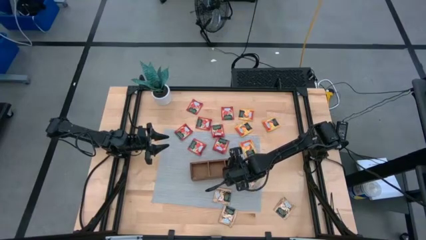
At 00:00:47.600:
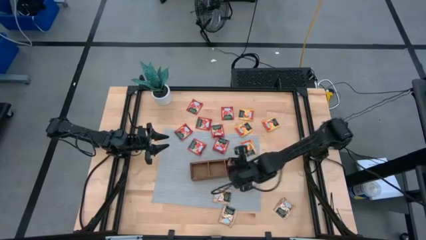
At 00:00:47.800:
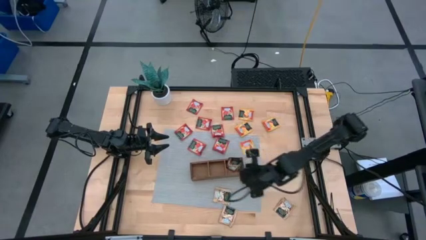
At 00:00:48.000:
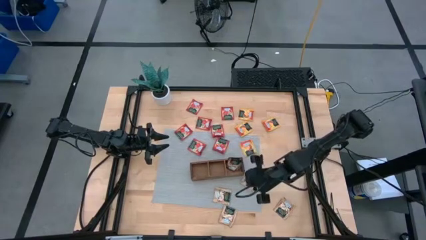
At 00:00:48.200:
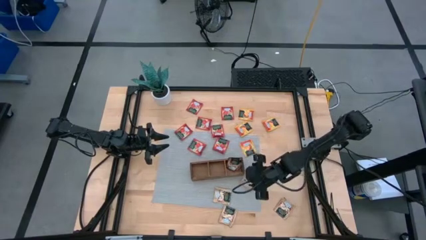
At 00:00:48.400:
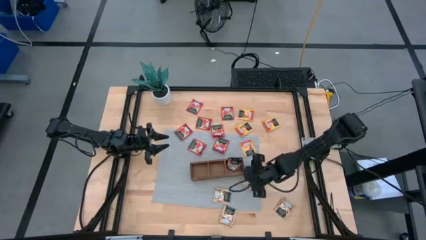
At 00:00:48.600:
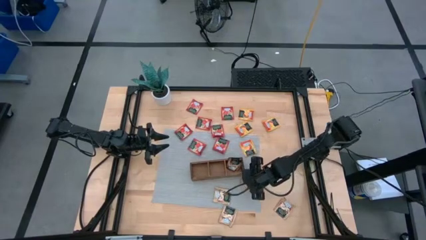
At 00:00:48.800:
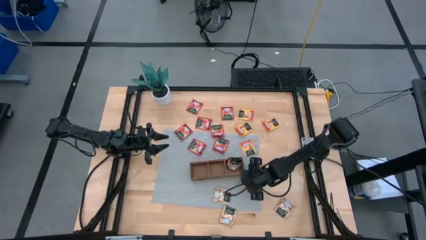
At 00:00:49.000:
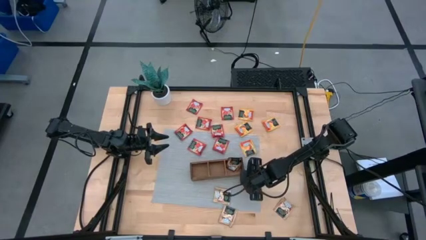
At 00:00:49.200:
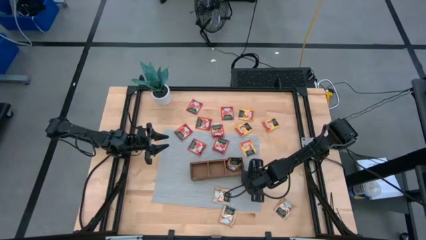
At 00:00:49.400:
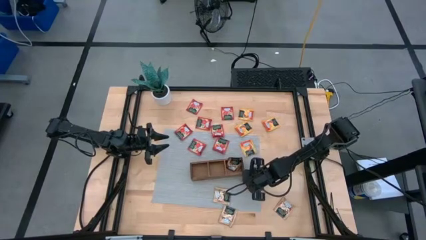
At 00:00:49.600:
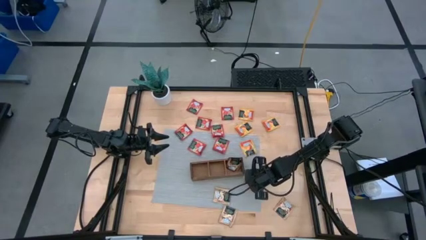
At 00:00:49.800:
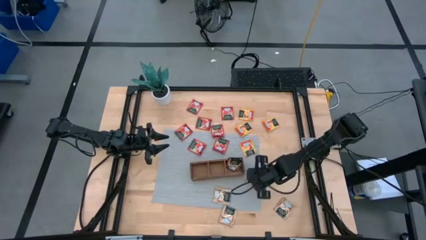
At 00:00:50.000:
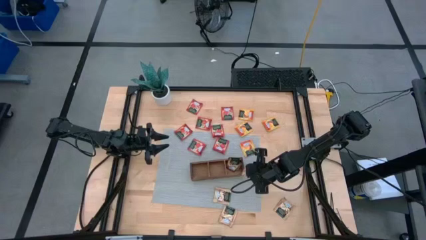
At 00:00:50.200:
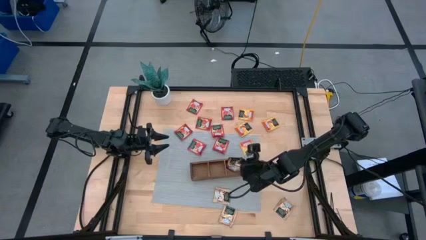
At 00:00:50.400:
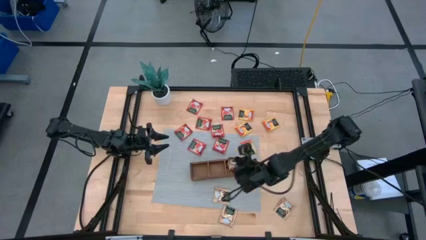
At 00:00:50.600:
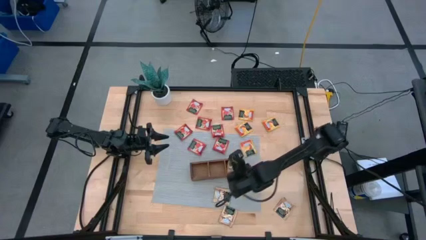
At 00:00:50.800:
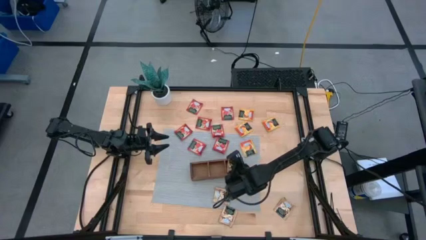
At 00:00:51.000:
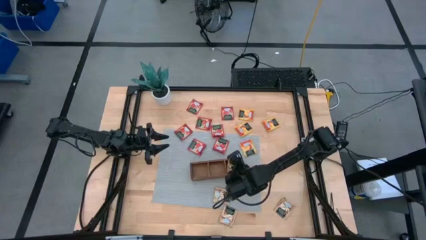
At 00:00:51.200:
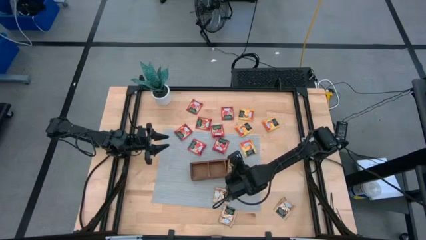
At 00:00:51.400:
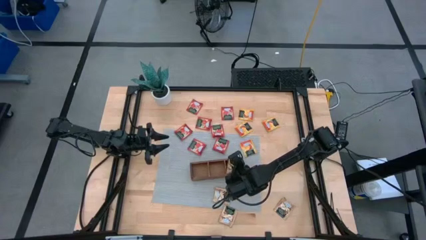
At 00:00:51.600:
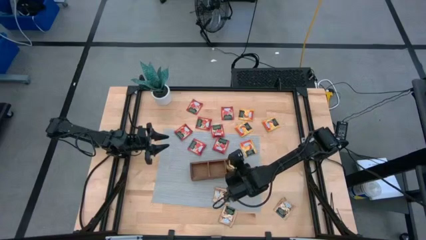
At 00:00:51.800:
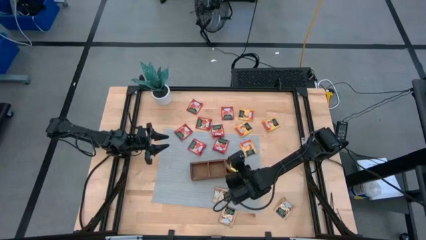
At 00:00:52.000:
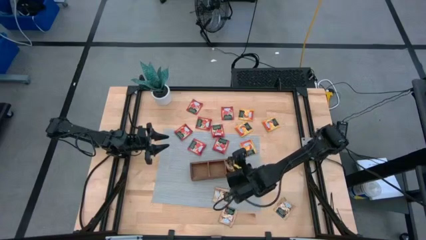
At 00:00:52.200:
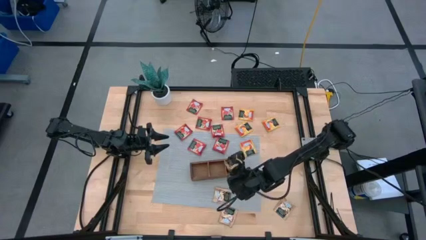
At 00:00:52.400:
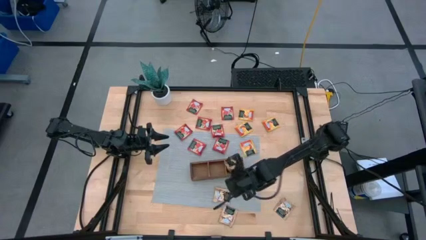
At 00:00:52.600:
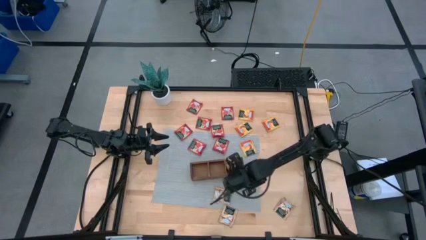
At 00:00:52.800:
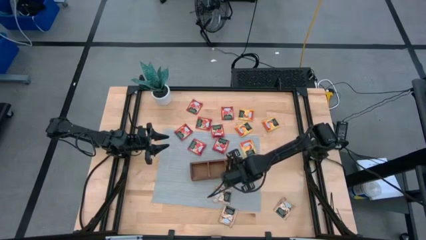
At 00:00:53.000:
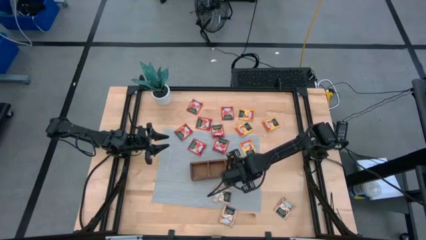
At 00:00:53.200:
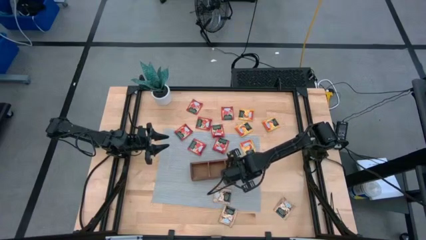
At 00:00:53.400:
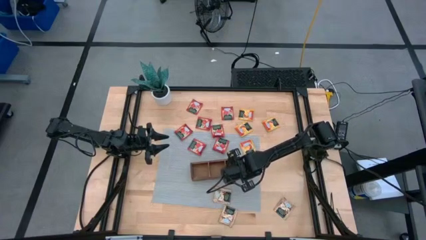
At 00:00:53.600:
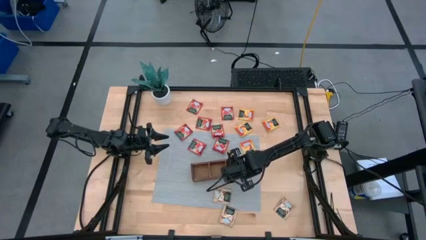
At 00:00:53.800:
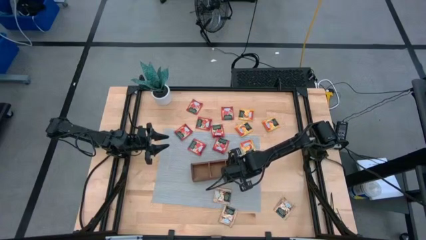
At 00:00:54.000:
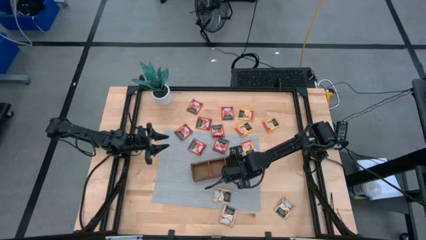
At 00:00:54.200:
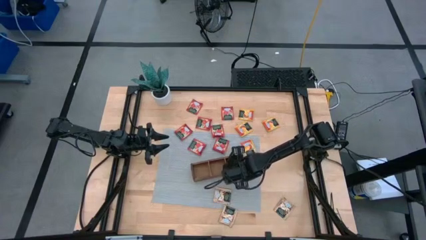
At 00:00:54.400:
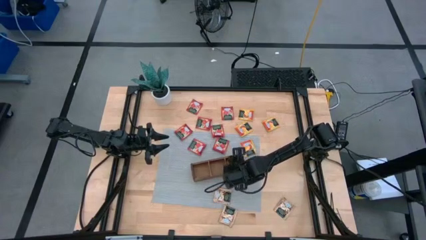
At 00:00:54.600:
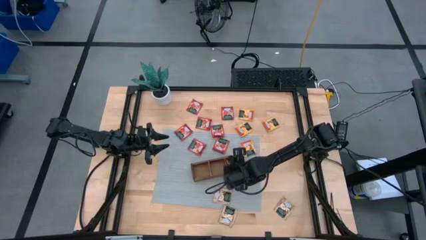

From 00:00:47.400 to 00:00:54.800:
Task: Pick & Place Tea
Put the brown tea bag into the right compartment of the wood organizer

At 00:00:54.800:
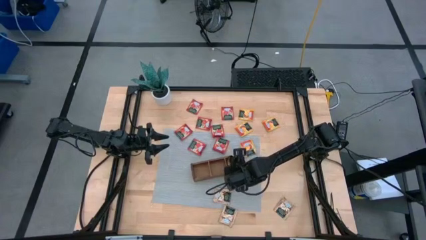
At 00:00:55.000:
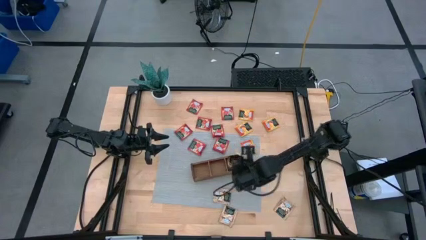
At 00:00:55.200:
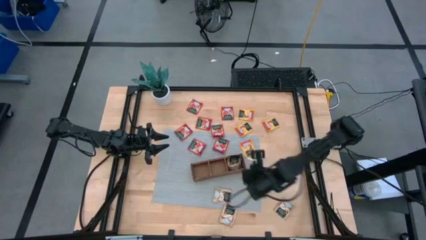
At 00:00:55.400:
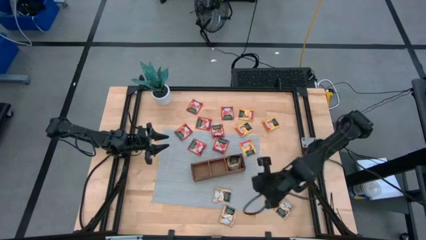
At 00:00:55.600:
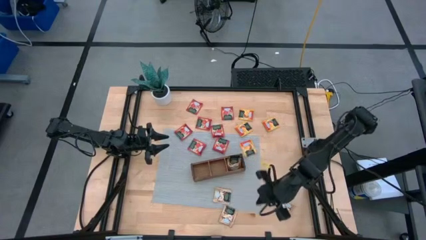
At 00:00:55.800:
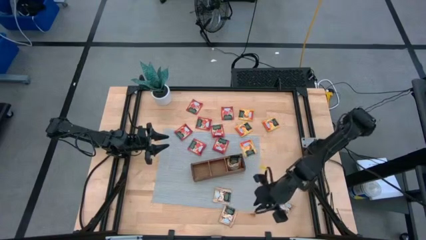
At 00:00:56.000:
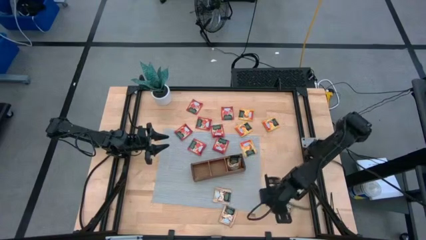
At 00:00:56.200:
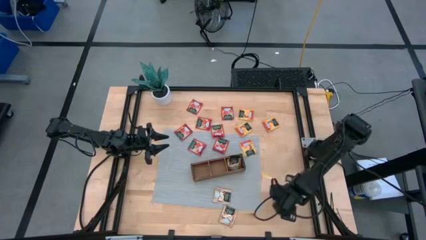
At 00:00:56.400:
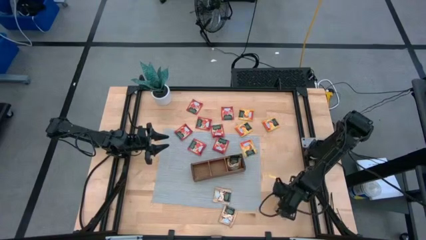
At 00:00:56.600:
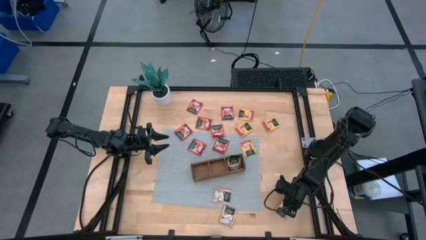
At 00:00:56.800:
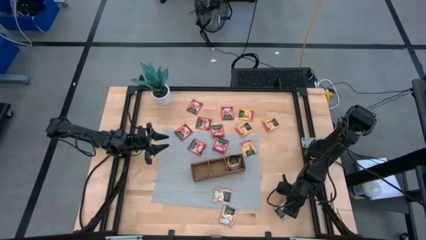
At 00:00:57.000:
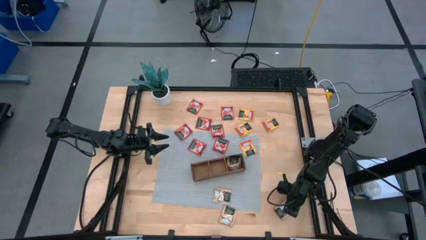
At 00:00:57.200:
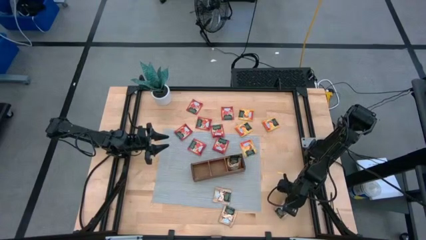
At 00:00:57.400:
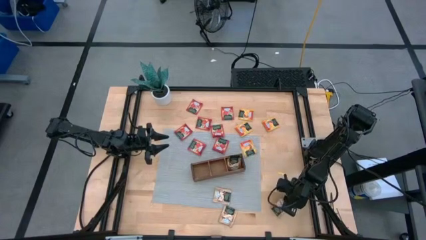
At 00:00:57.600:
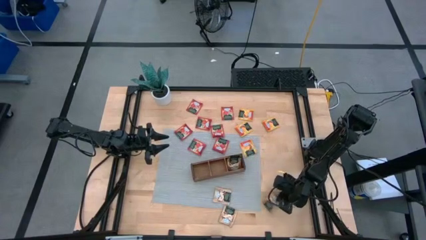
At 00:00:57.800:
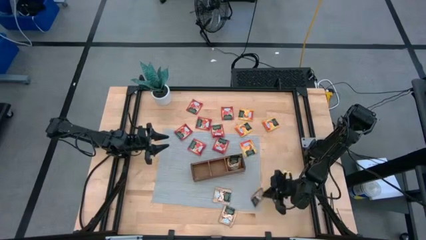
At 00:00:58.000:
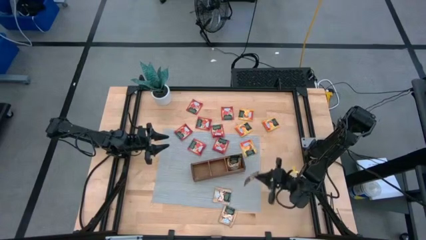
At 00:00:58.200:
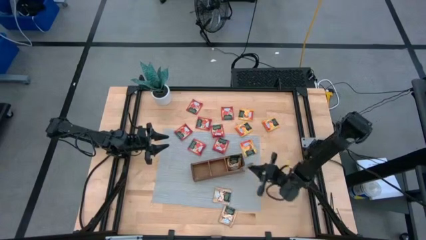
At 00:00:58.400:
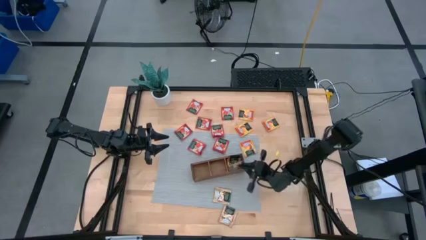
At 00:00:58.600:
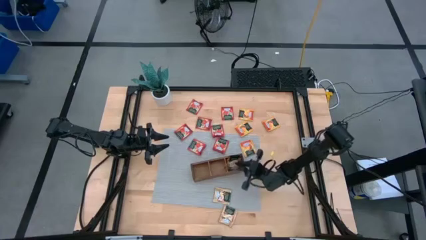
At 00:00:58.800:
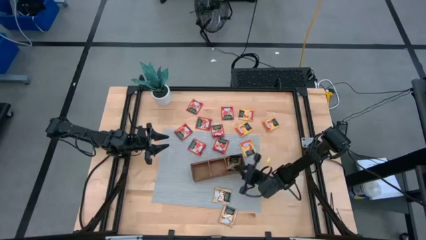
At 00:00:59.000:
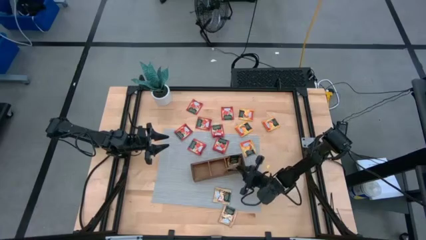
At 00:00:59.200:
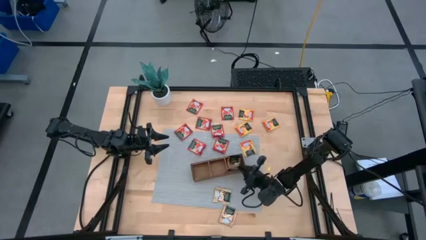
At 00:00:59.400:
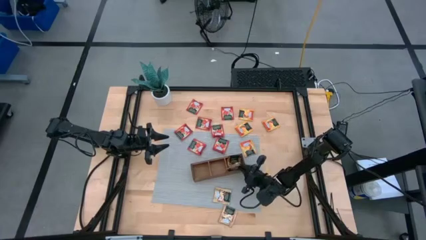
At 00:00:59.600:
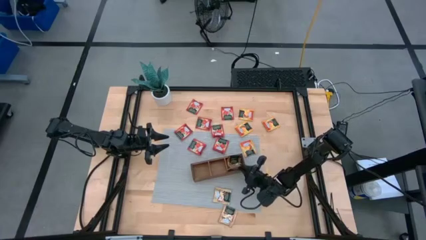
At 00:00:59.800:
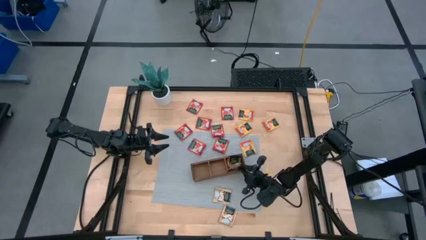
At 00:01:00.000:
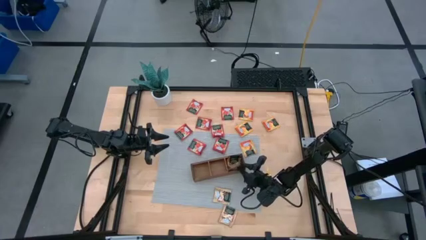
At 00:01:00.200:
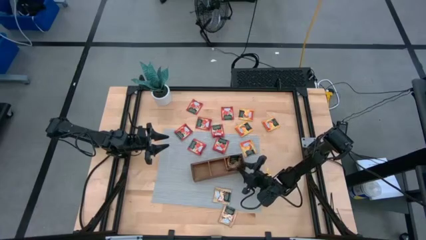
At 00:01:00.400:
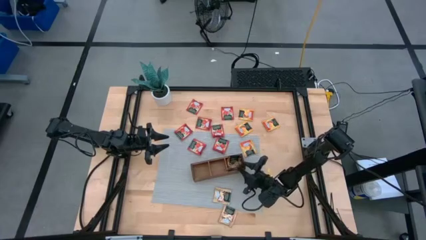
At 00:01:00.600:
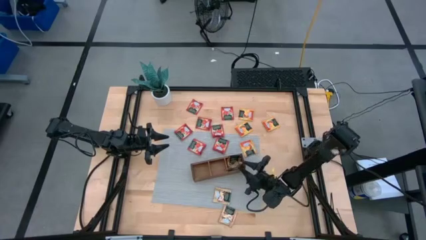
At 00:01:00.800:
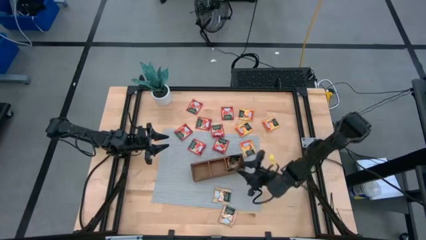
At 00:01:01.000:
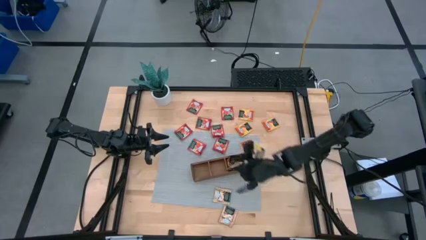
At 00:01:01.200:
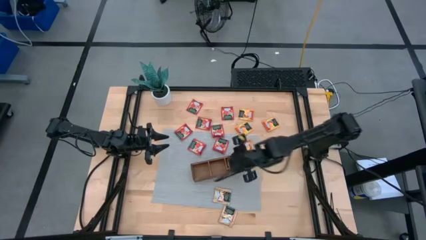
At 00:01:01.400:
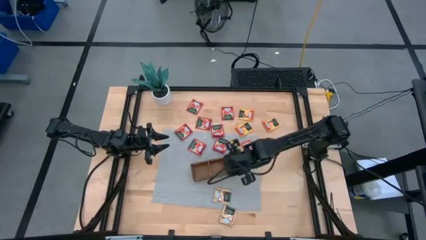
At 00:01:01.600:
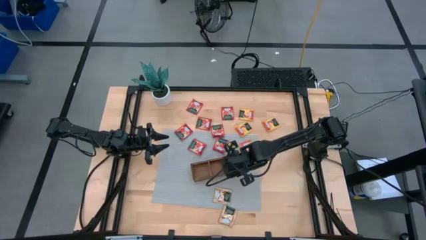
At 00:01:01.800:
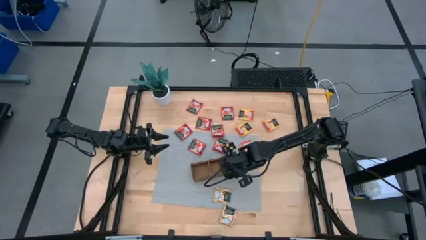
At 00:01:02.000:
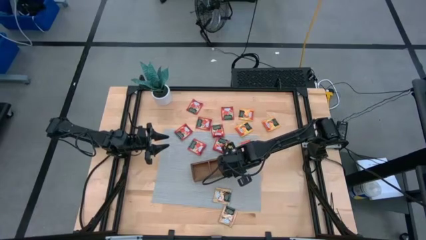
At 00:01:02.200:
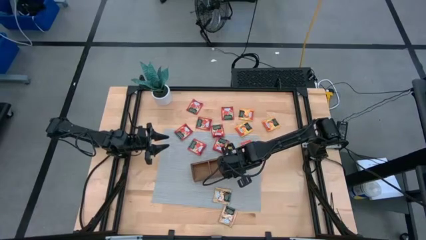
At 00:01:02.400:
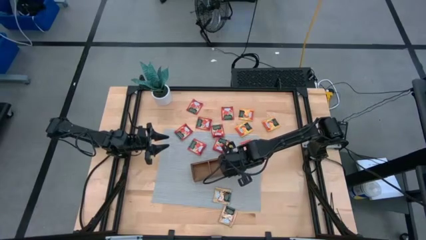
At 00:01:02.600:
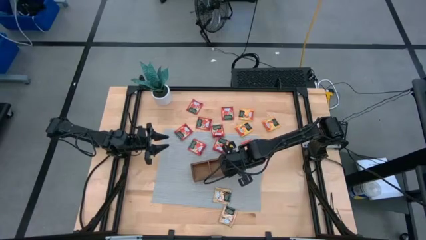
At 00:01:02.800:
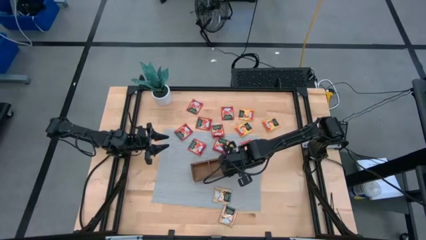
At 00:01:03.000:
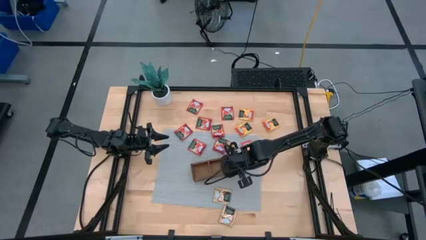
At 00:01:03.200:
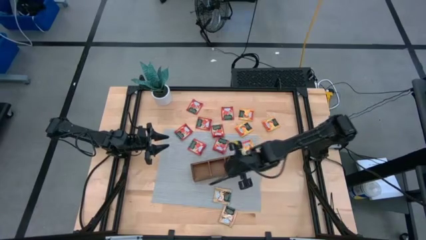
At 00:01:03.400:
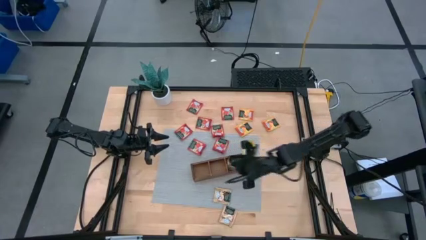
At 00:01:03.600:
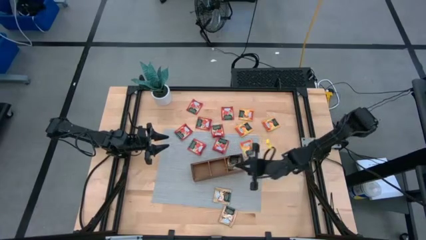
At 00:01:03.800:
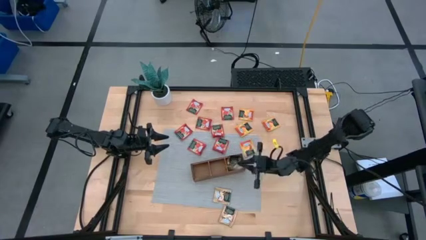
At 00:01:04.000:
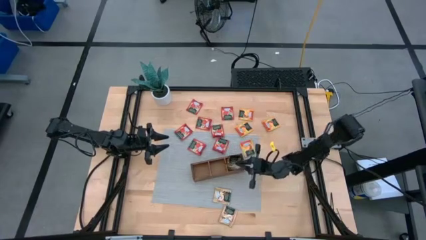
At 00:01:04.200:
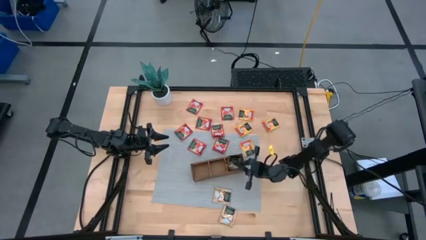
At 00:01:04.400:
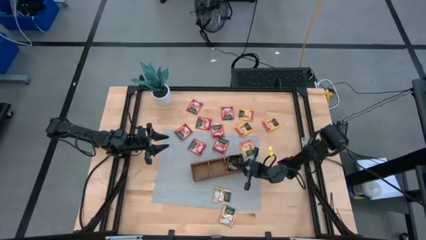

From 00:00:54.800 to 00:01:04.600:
Put the brown tea bag into the right compartment of the wood organizer
